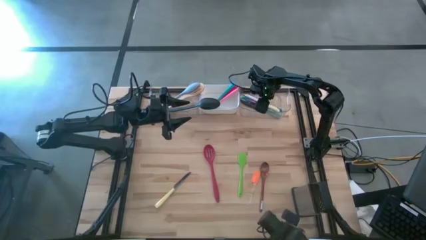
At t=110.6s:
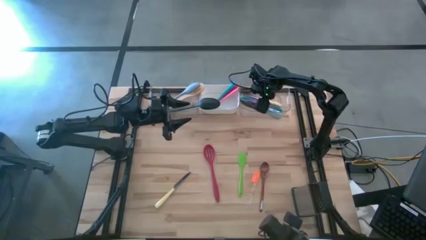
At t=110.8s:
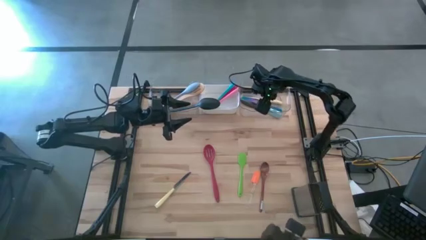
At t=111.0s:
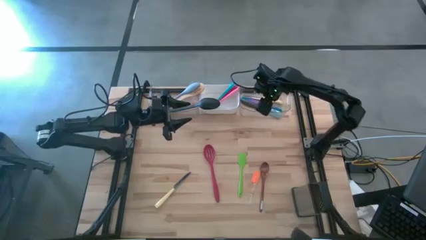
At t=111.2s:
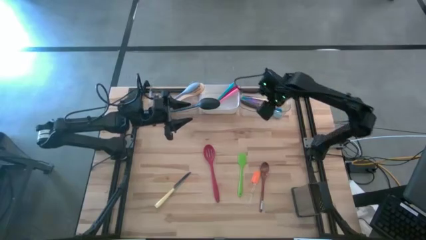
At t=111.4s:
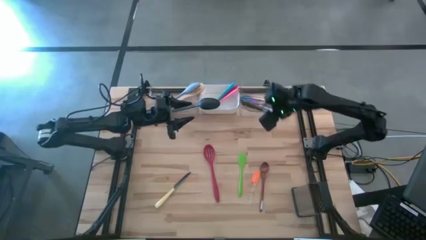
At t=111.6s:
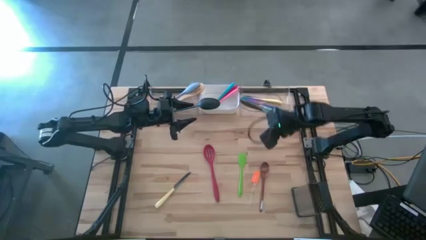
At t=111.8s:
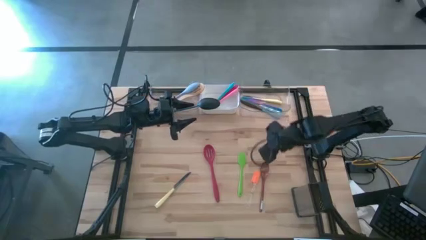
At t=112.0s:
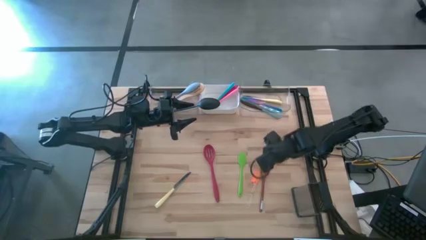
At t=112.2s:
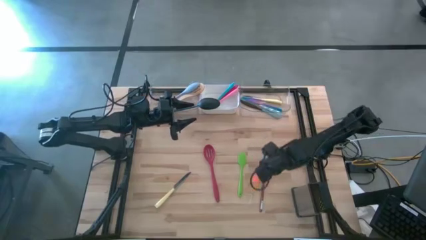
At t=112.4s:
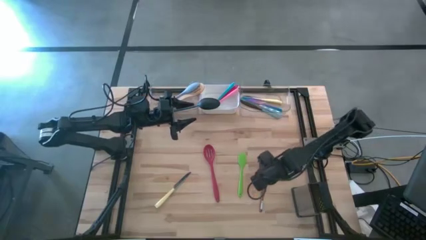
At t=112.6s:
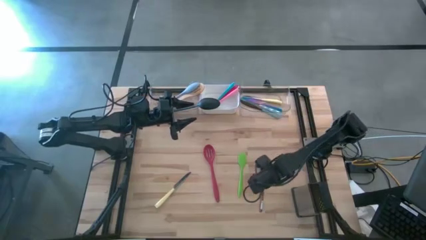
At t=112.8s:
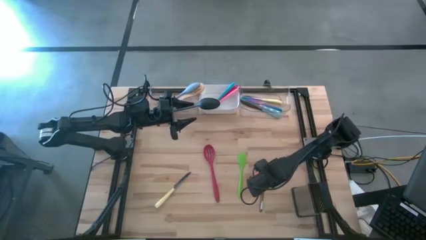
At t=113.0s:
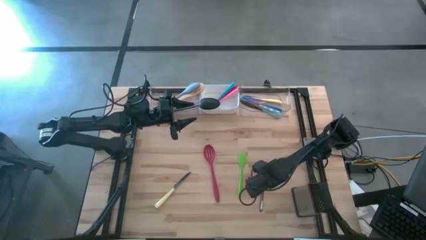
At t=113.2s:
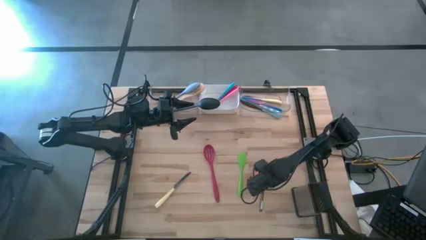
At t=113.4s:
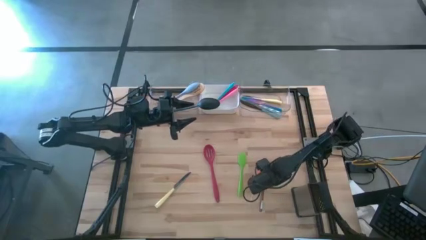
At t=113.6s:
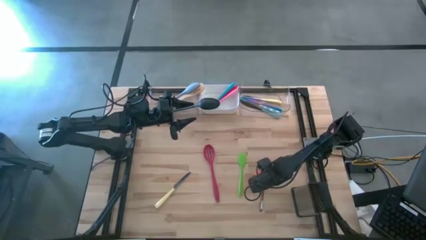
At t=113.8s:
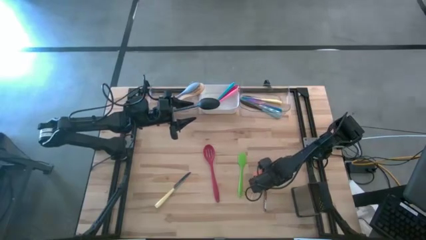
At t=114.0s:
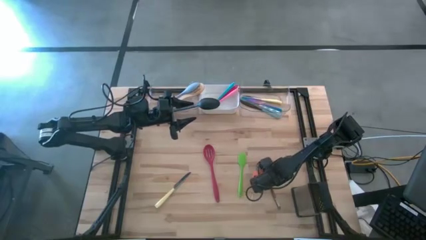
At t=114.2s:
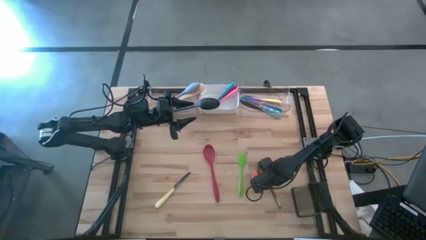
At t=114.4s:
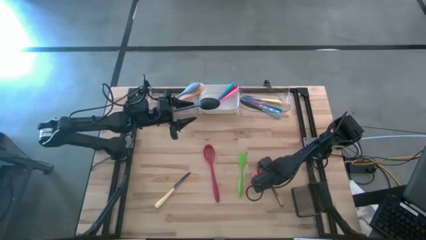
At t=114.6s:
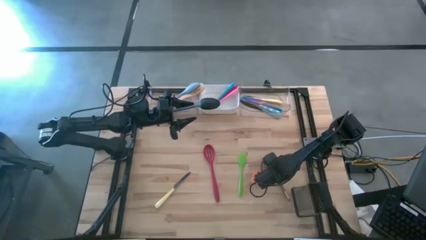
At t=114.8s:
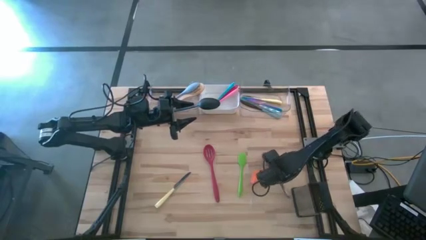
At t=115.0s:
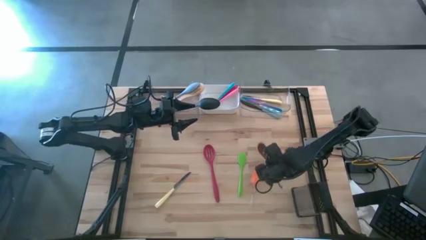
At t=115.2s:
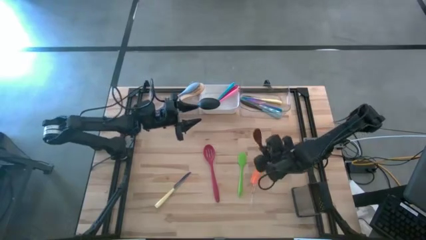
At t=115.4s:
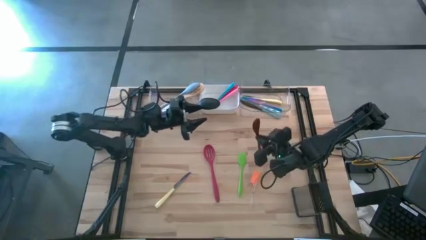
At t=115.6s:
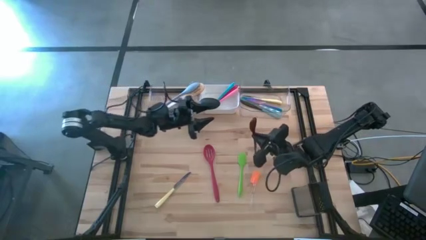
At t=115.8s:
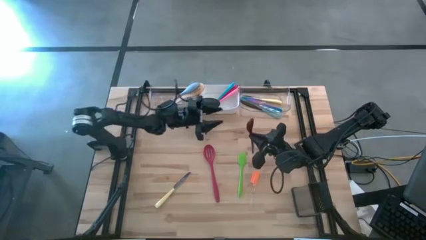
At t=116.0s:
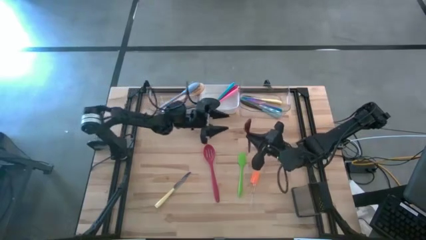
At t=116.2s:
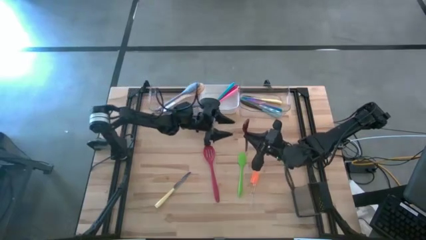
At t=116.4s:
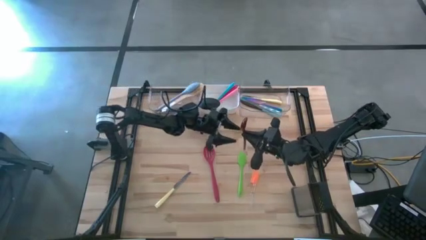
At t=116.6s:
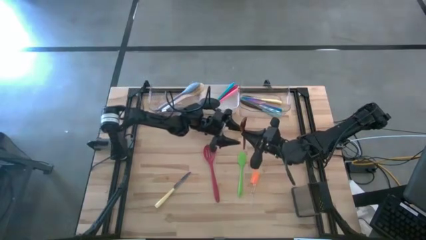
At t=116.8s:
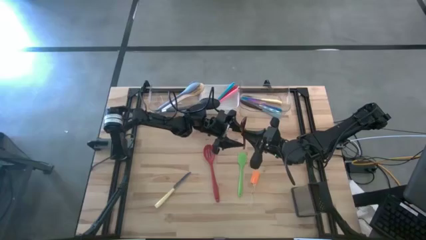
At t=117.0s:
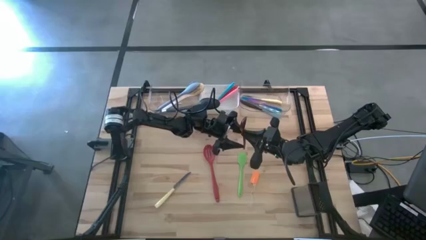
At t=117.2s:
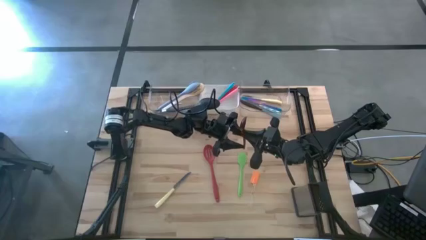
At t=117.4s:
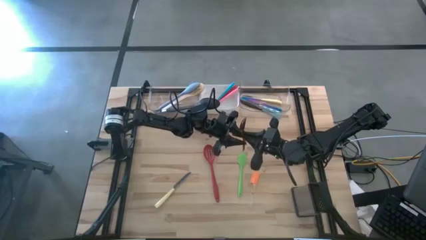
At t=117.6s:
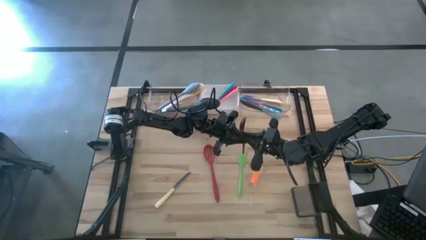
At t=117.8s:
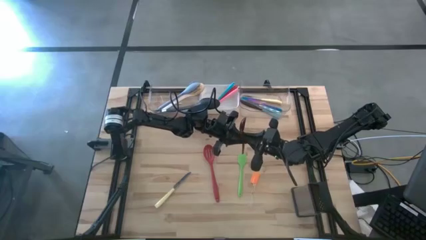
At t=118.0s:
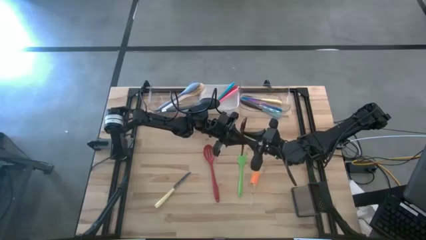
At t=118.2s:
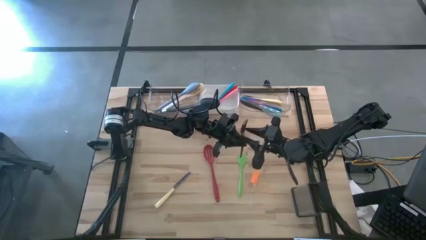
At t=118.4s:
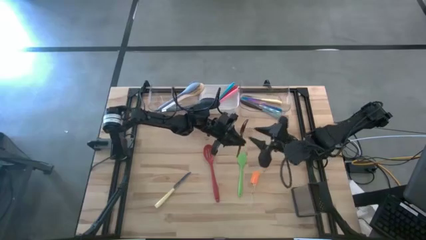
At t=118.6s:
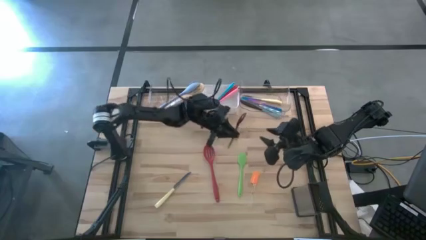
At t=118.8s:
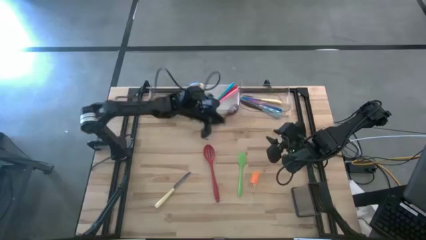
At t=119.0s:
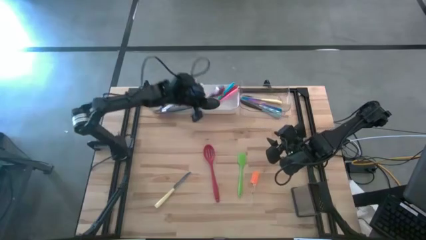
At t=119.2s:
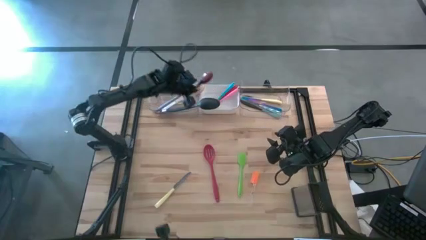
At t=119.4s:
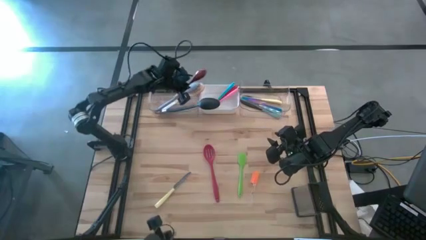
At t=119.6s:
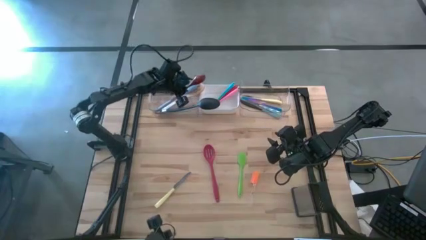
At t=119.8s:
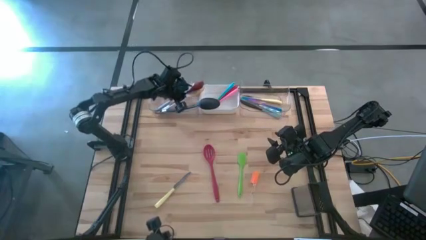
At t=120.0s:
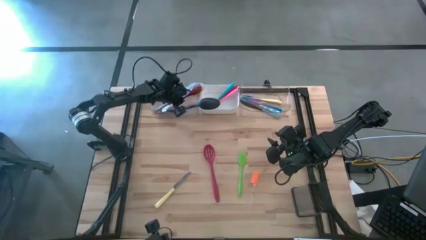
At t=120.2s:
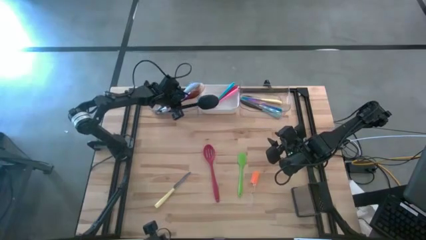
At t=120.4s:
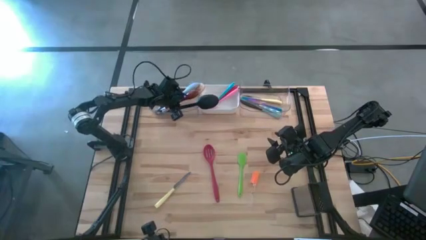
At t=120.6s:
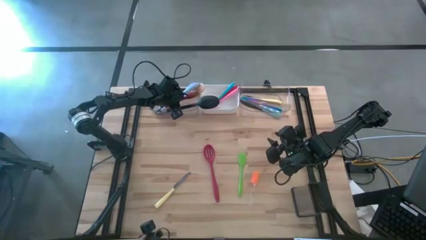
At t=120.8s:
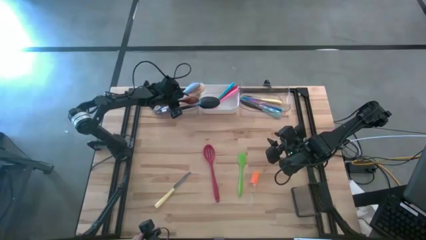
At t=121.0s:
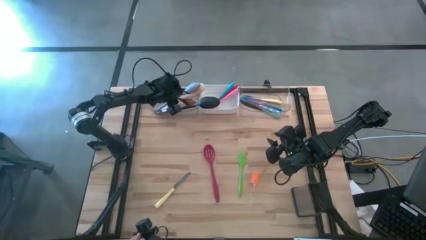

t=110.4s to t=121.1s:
Task: Pick & Place Kitchen Items
Put the wood brown cooking spoon into the left transparent bin

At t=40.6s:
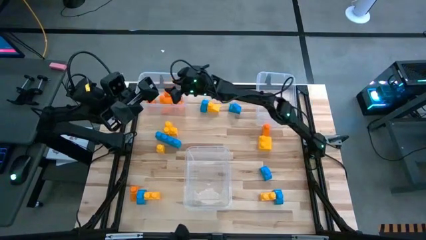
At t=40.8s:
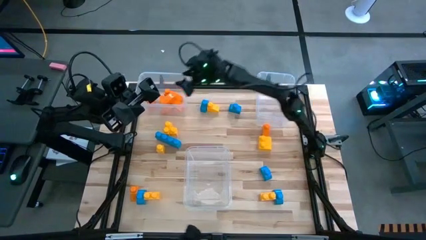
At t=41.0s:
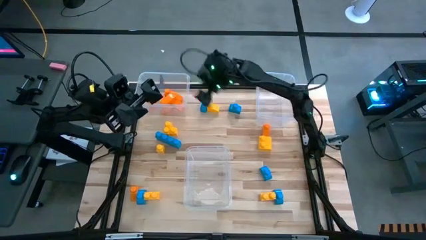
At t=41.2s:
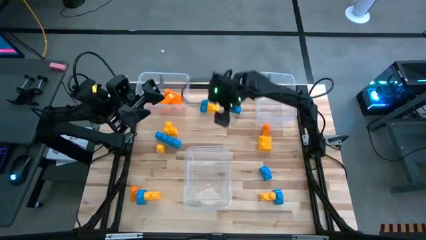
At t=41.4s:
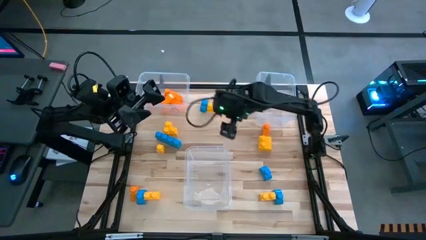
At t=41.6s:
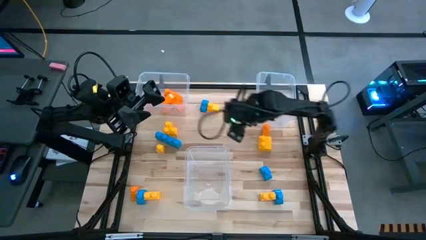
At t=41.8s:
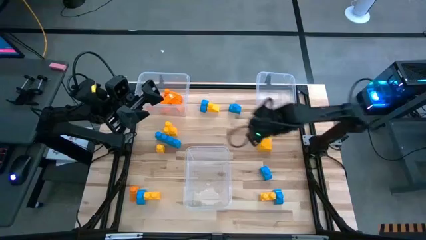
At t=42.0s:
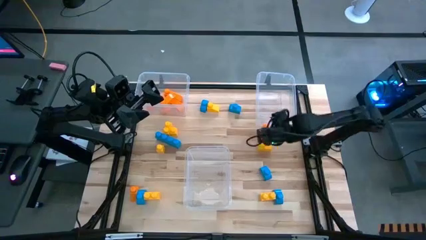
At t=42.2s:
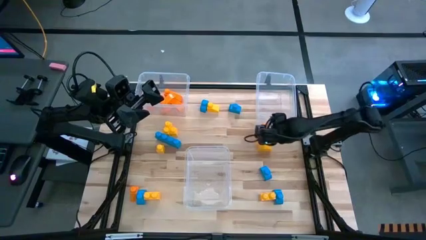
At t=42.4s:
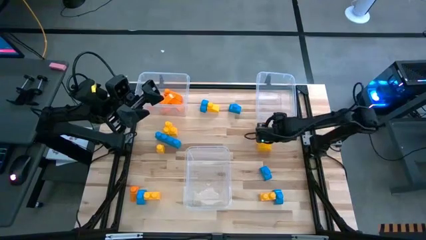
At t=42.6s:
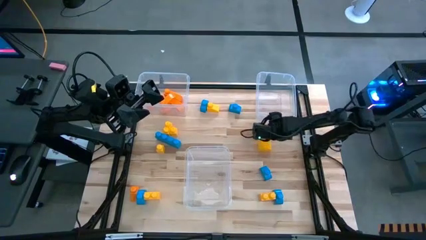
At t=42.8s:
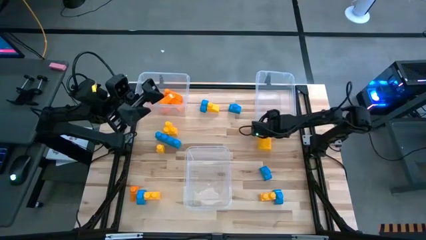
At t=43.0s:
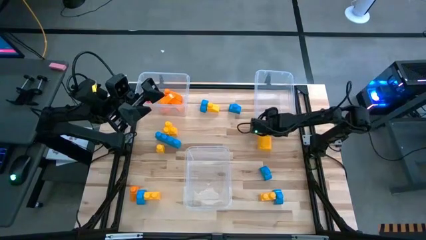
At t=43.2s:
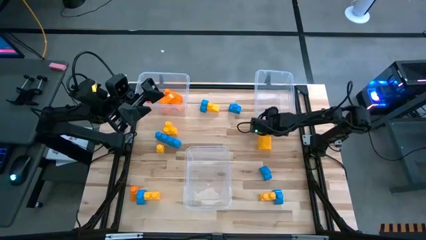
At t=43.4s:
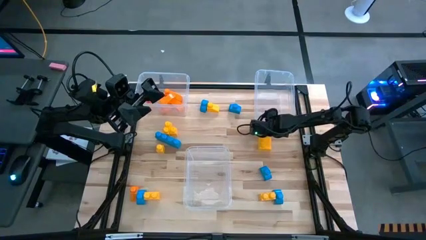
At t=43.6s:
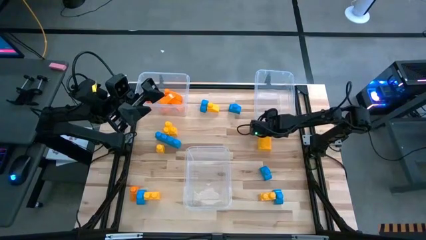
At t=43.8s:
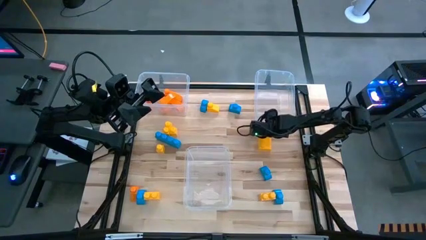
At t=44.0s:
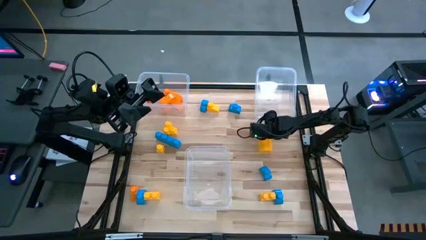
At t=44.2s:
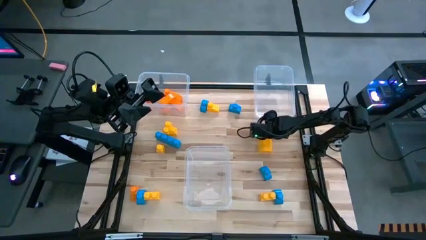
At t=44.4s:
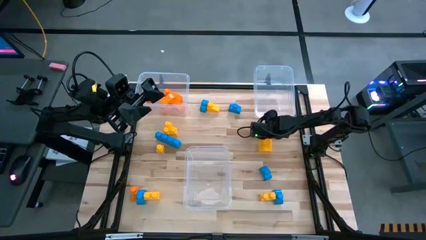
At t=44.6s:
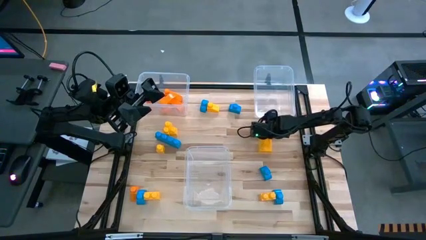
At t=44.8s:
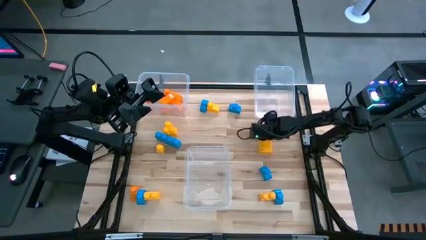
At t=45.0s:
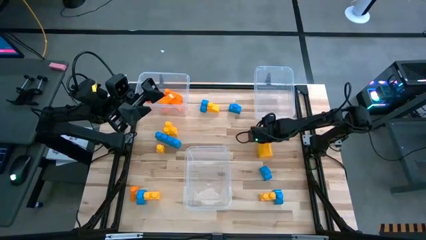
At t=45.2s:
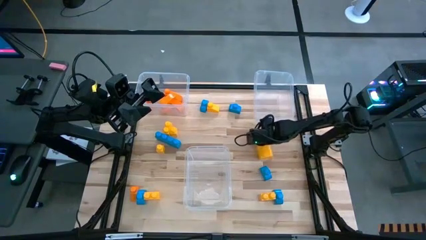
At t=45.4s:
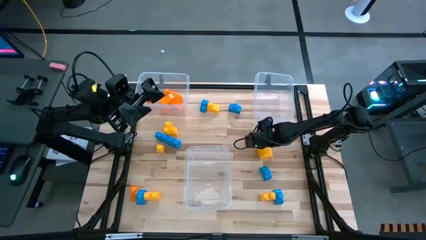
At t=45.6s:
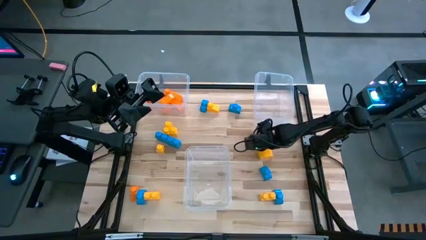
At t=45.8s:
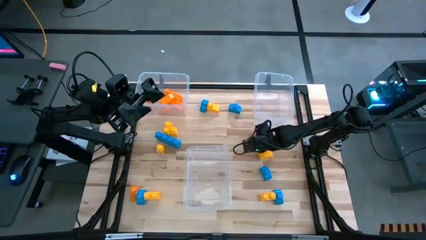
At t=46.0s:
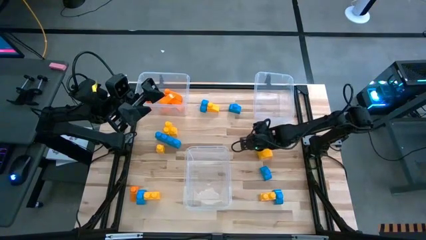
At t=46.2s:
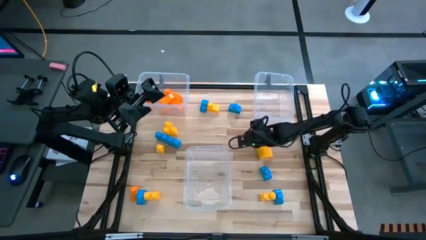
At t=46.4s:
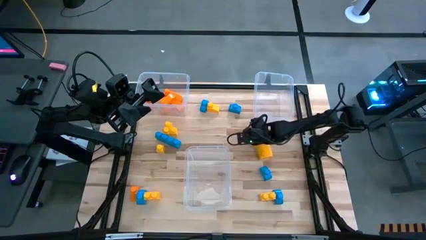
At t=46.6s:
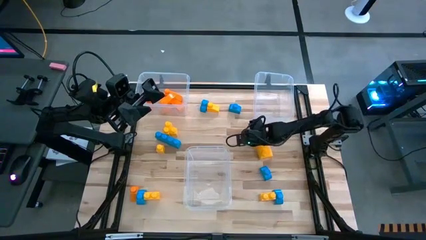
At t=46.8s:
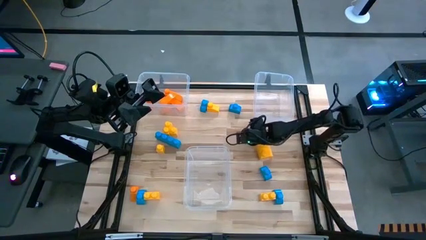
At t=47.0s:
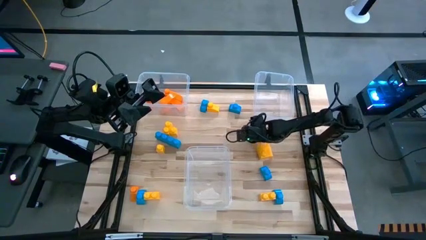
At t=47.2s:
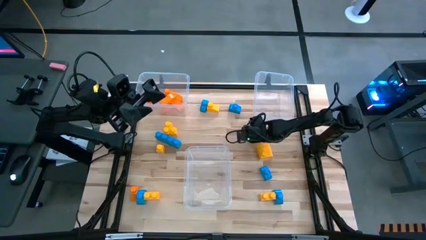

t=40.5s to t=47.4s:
Task: Sort blocks
Put the orange game piece into the top left transparent bin
